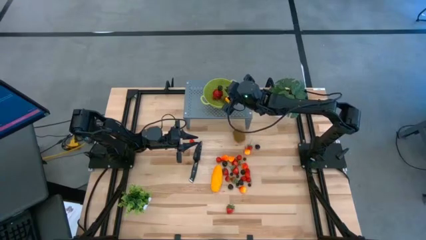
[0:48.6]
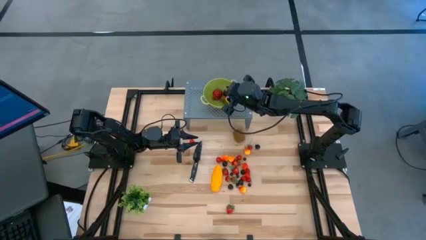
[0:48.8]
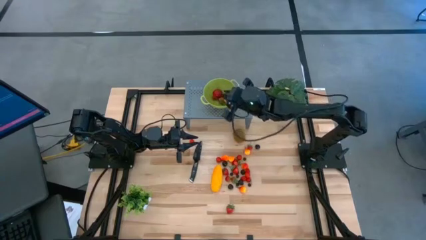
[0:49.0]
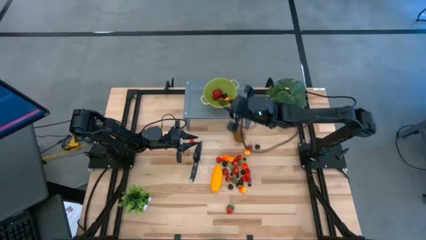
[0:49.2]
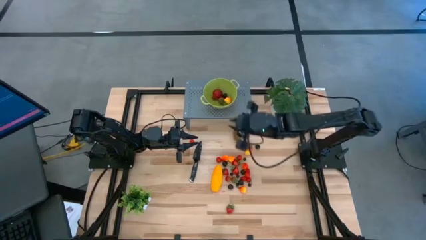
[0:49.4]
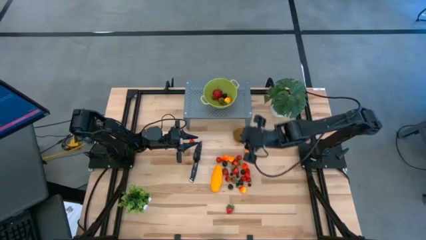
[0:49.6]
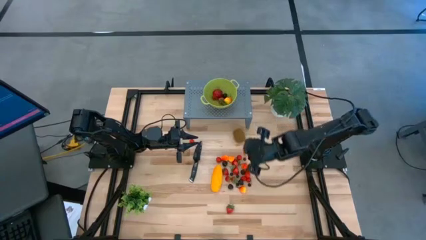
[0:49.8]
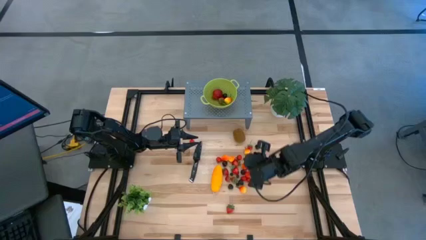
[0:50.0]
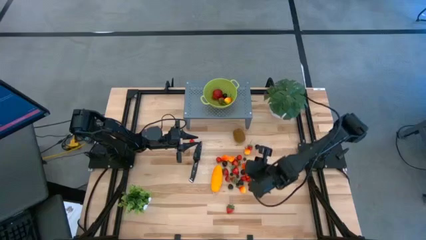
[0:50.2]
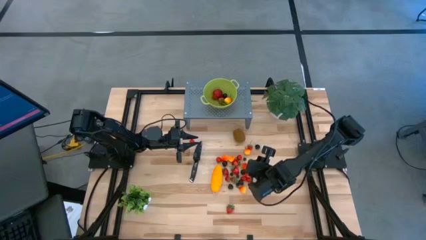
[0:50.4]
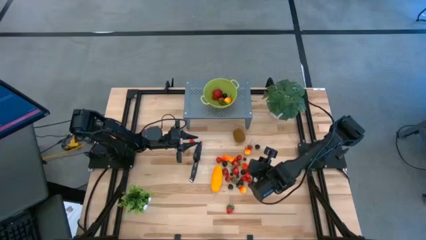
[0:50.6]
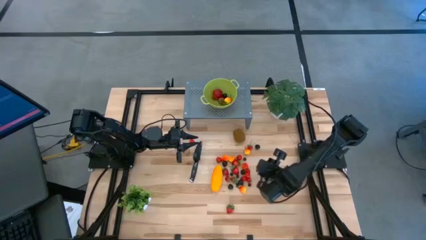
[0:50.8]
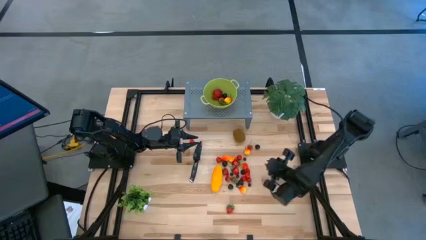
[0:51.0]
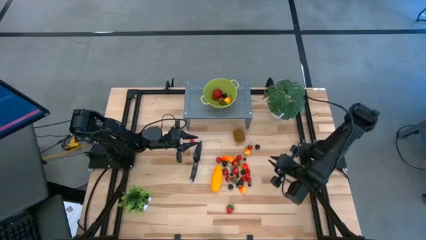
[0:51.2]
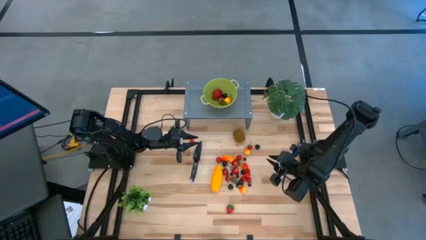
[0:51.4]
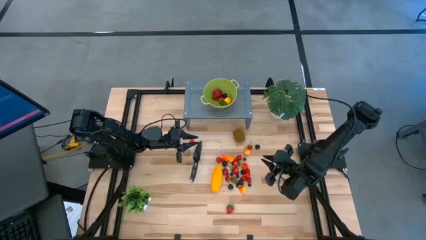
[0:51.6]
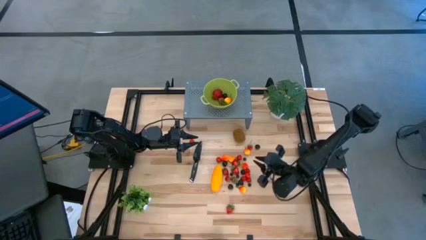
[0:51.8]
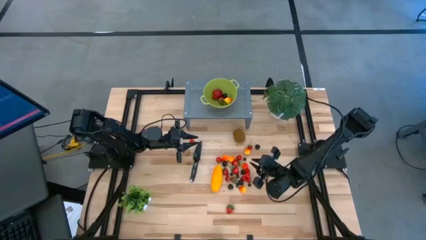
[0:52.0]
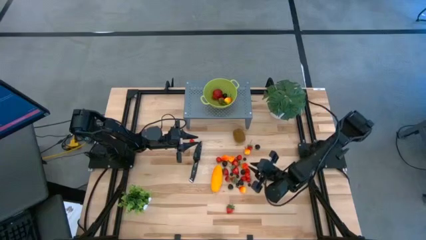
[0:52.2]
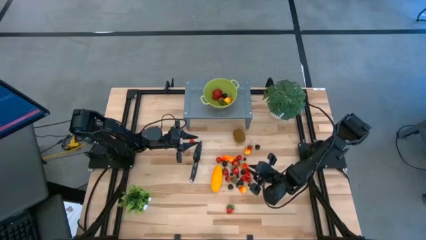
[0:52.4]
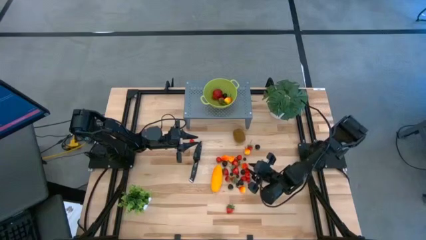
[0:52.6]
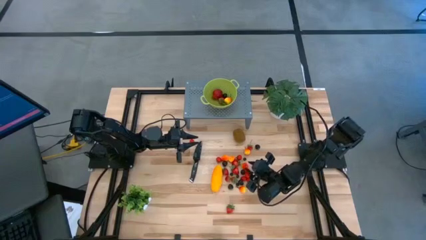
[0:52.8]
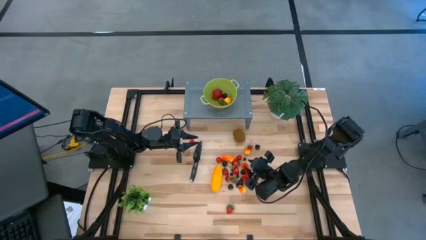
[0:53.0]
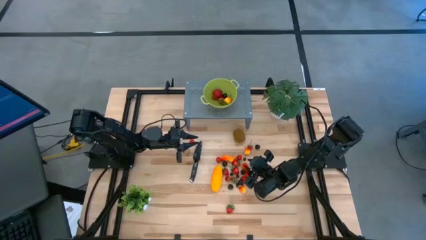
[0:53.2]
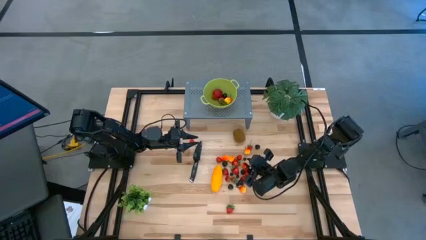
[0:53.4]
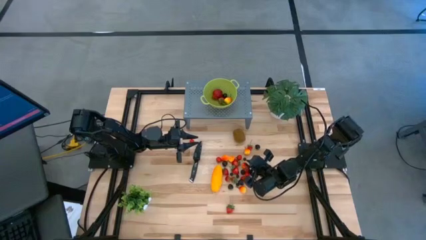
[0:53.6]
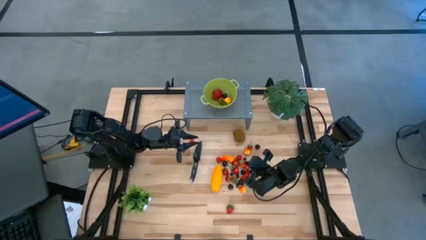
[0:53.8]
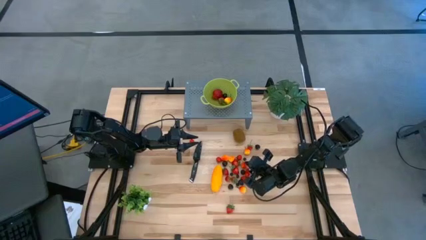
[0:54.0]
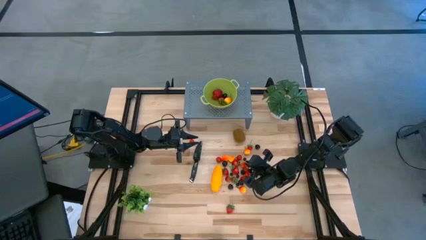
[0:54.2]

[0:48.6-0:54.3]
Task: Pick & Place Fruit
Put the peach into the green strainer bowl on the shelf

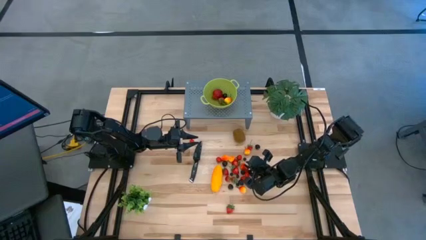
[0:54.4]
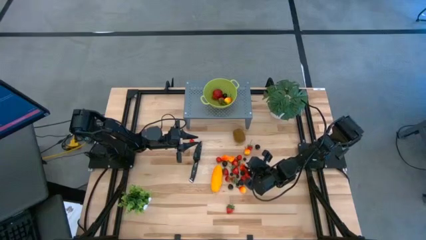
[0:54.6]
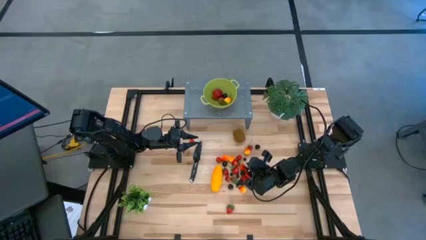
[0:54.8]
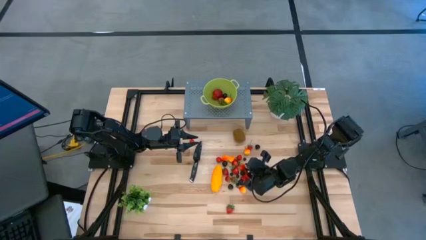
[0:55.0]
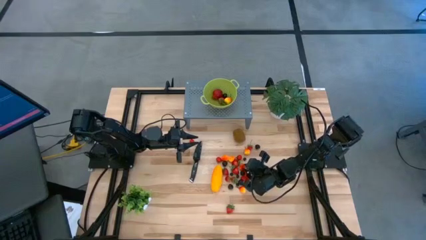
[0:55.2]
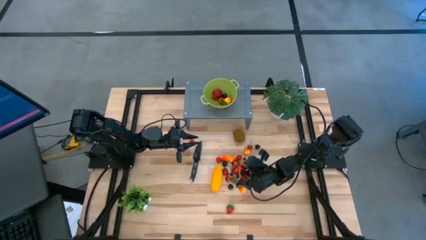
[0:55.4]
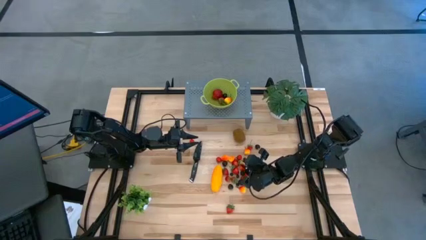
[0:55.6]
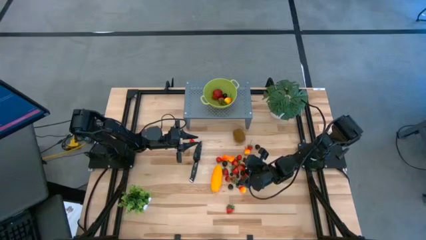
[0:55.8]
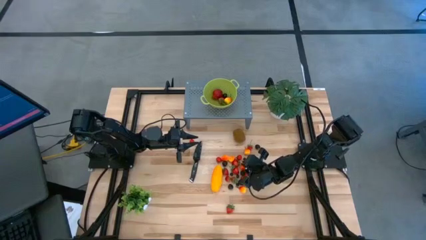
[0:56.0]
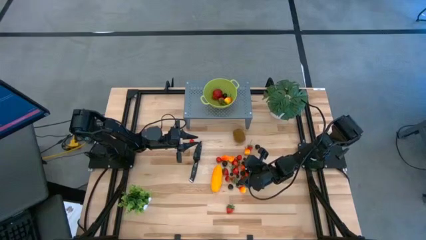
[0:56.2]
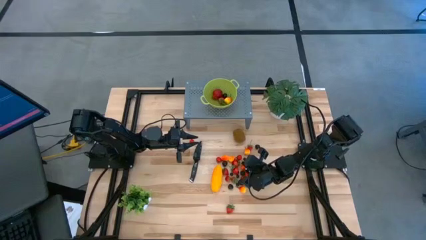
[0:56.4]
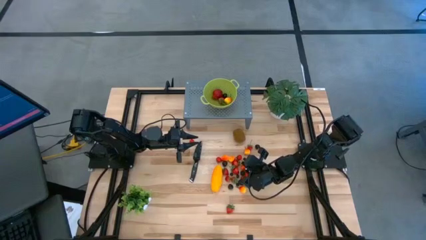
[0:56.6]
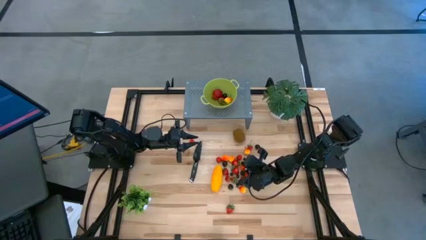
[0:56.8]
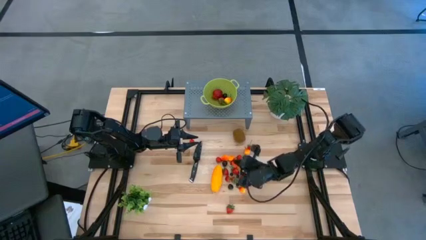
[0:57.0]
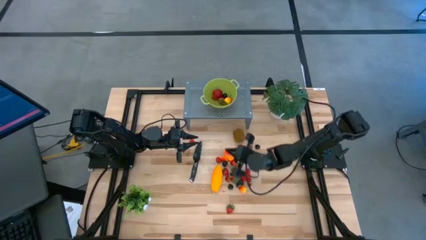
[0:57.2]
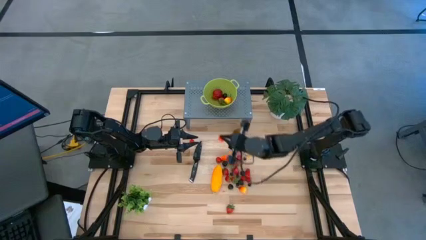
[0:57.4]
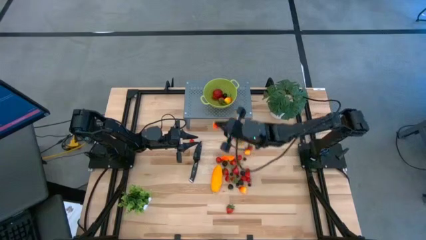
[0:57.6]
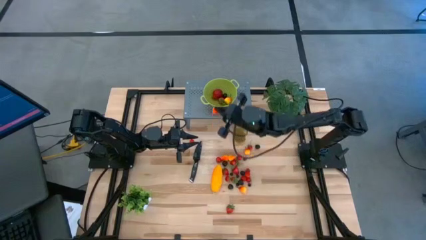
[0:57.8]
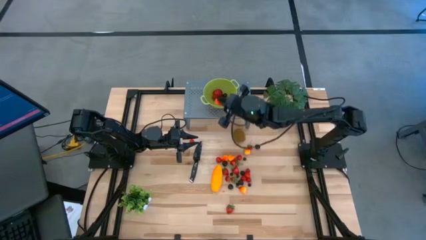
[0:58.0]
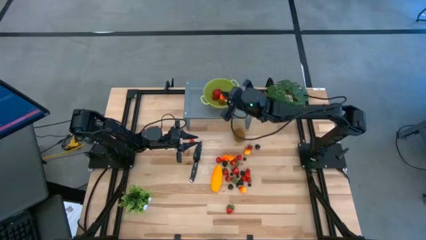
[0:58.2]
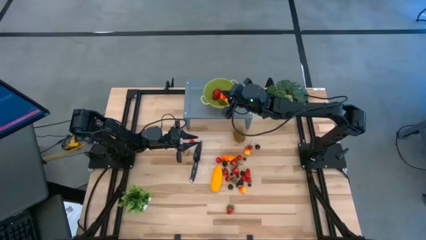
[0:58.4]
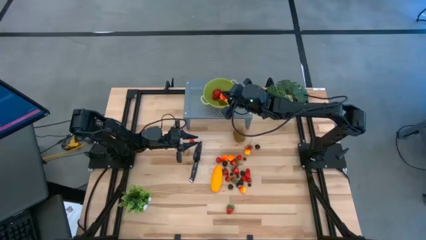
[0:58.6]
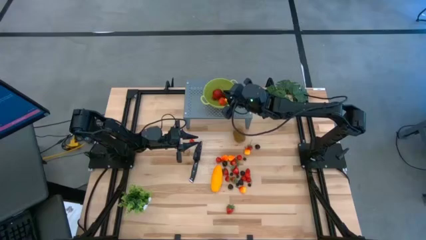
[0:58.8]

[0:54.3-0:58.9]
Put the peach into the green strainer bowl on the shelf

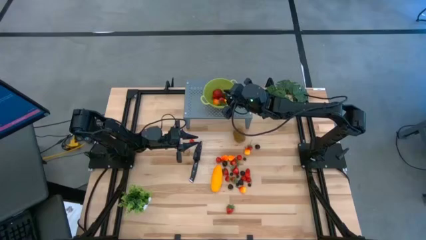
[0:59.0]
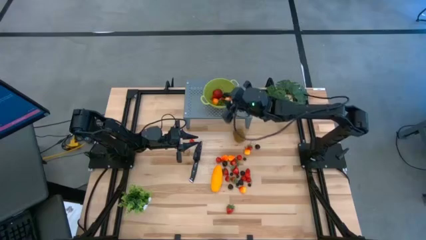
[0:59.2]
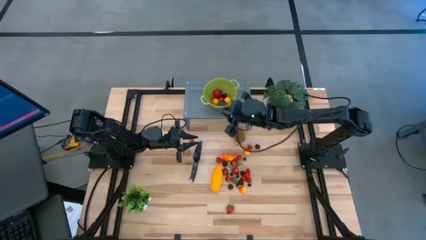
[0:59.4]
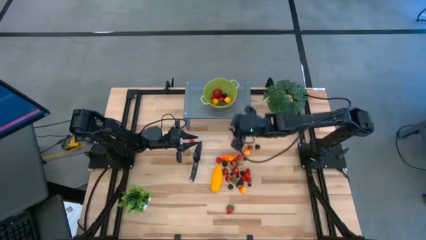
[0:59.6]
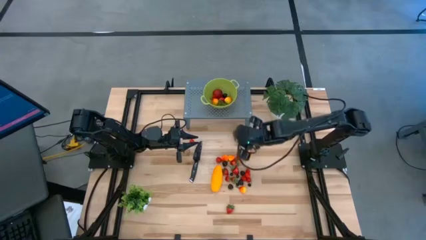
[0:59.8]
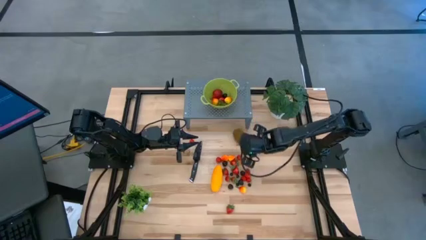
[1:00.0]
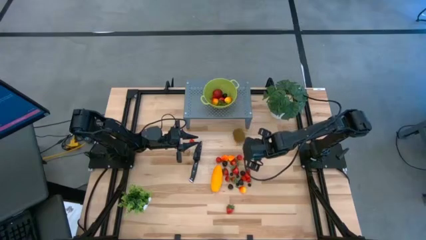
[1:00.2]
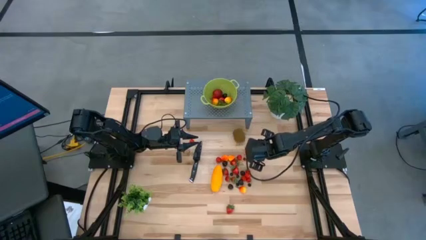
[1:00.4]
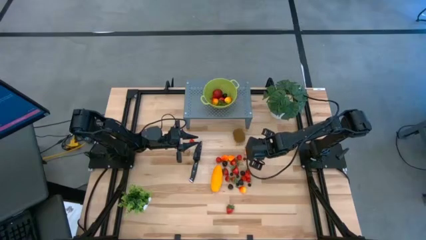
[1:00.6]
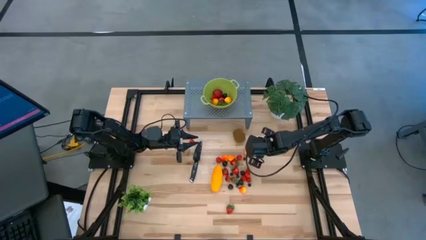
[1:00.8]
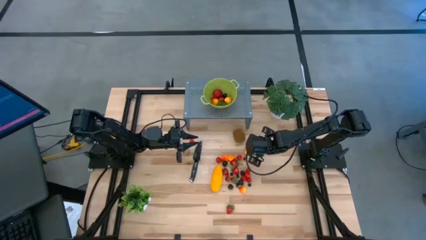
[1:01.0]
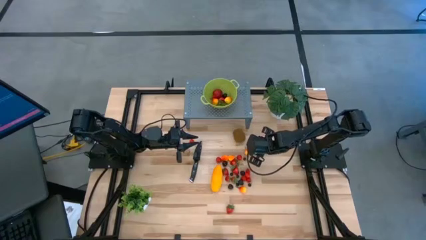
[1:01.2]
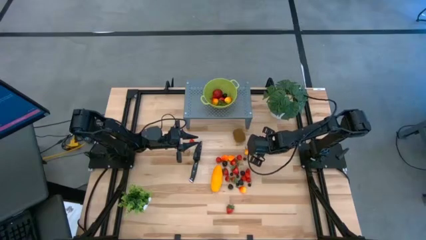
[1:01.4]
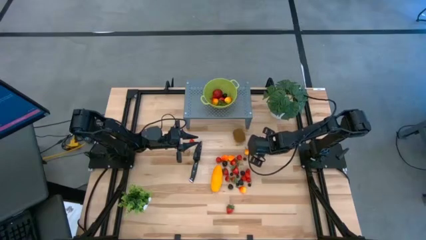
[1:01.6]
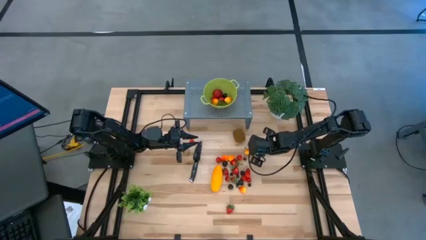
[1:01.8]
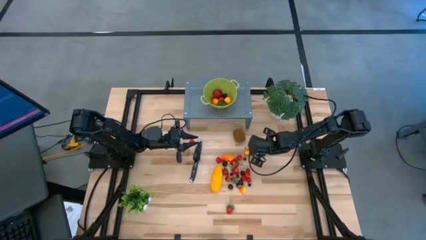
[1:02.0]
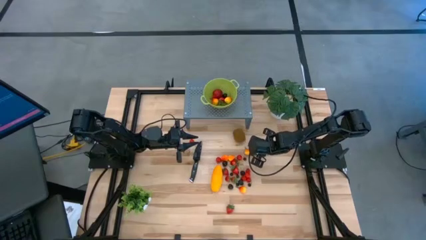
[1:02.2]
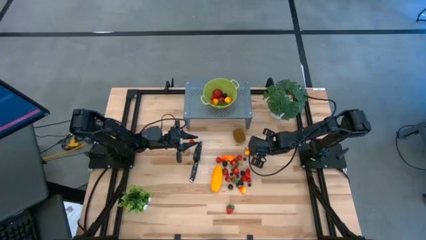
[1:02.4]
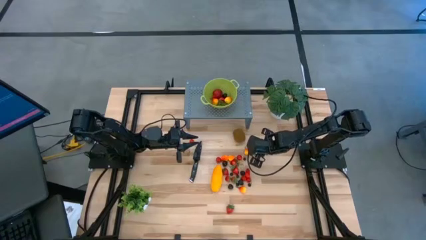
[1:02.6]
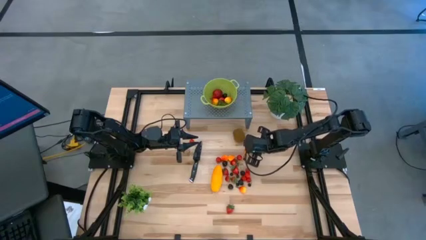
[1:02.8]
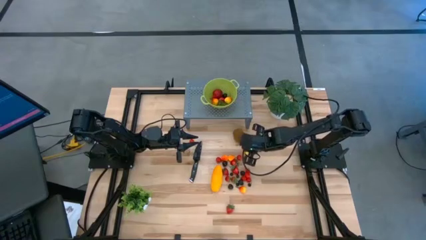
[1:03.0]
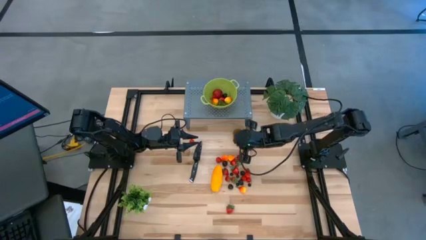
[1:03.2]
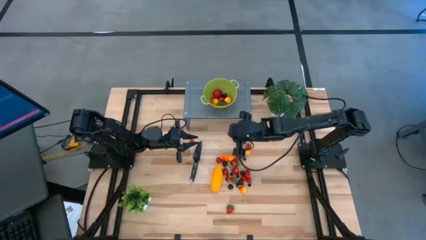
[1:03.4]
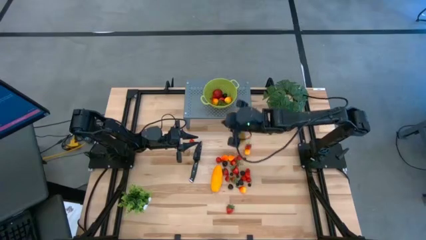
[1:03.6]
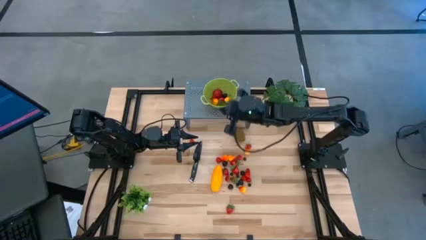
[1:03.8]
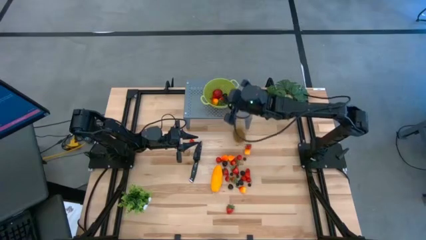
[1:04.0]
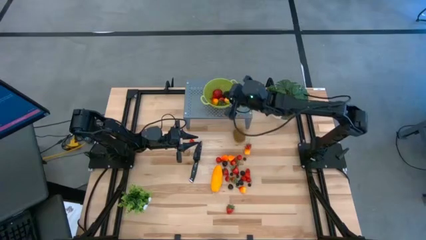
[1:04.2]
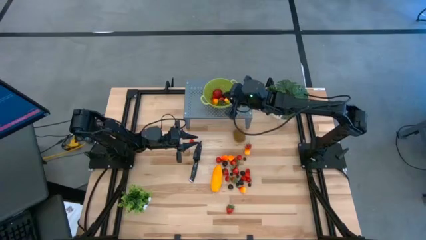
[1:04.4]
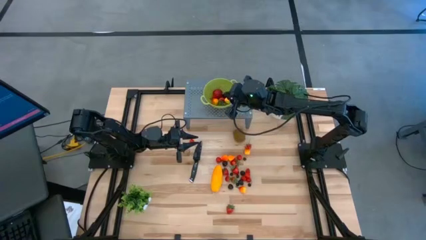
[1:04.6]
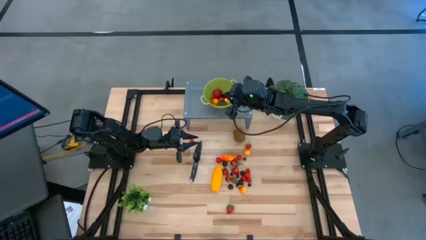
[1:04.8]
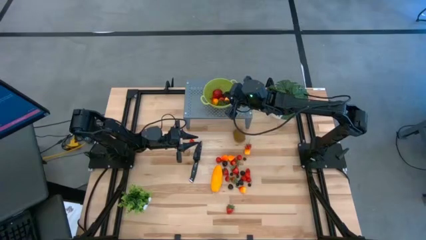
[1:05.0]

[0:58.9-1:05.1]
Put the black cherry into the green strainer bowl on the shelf
